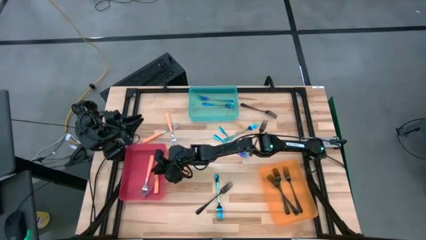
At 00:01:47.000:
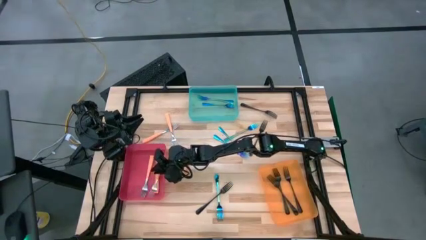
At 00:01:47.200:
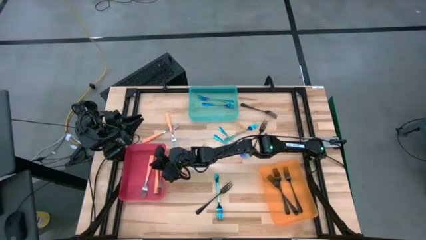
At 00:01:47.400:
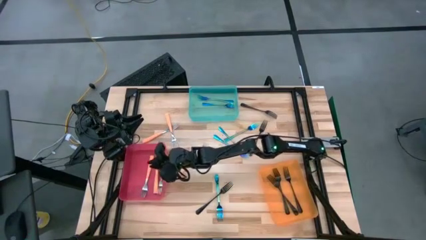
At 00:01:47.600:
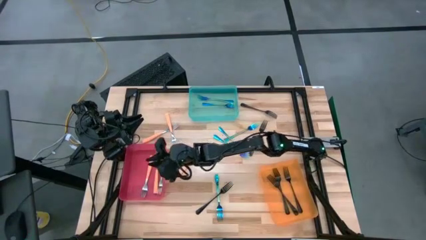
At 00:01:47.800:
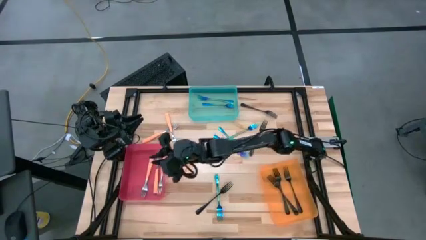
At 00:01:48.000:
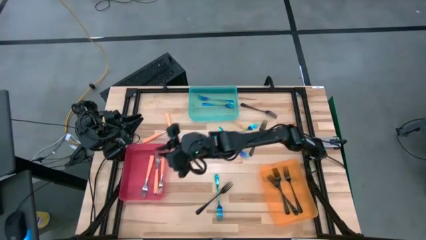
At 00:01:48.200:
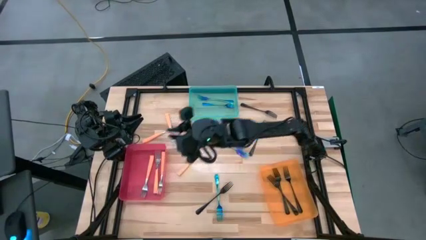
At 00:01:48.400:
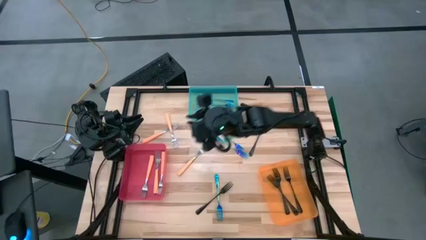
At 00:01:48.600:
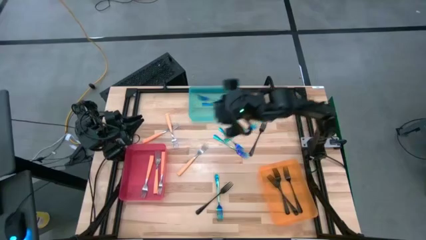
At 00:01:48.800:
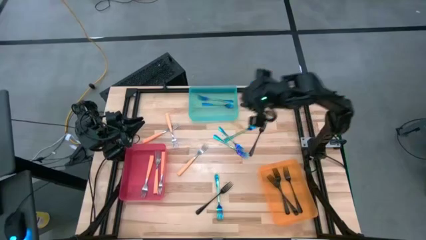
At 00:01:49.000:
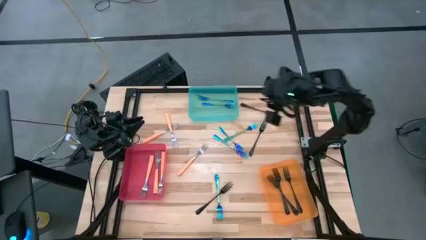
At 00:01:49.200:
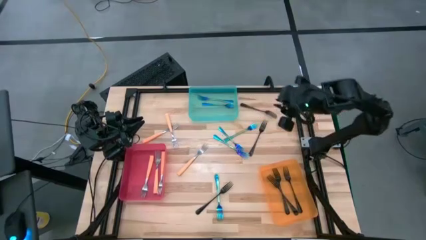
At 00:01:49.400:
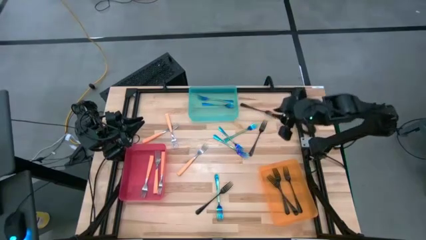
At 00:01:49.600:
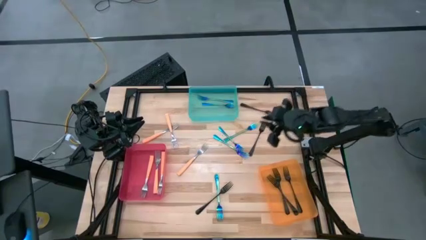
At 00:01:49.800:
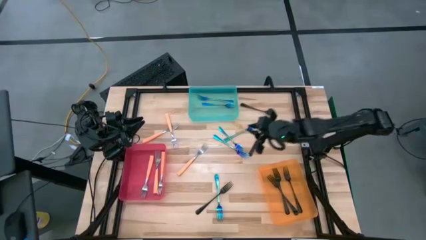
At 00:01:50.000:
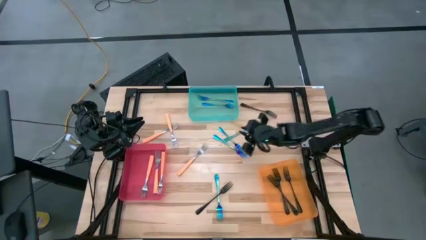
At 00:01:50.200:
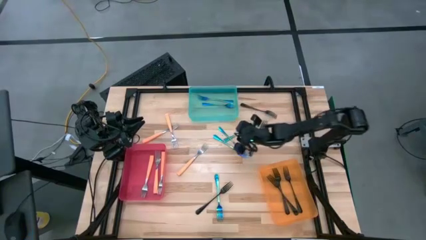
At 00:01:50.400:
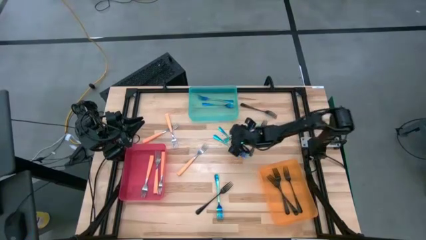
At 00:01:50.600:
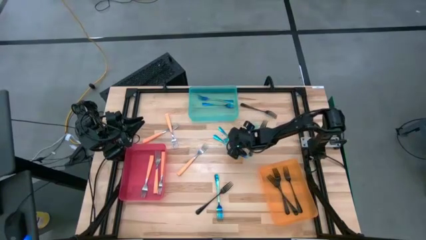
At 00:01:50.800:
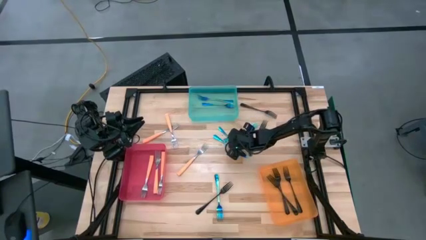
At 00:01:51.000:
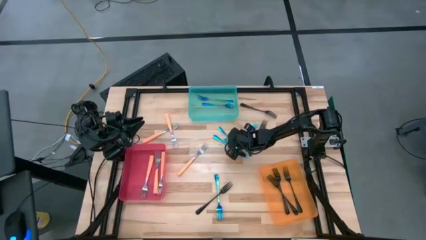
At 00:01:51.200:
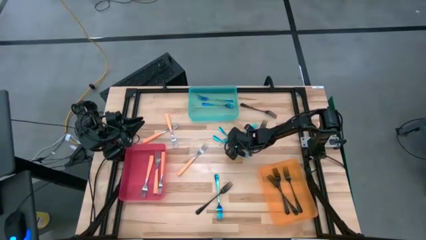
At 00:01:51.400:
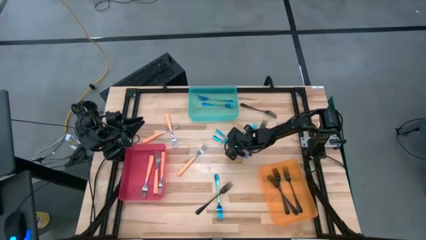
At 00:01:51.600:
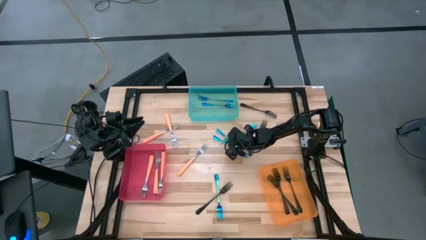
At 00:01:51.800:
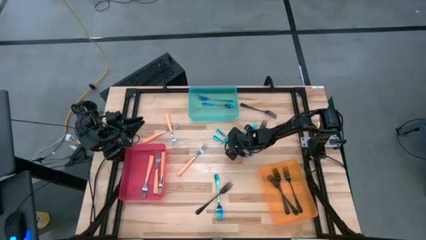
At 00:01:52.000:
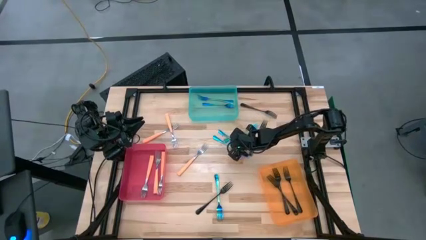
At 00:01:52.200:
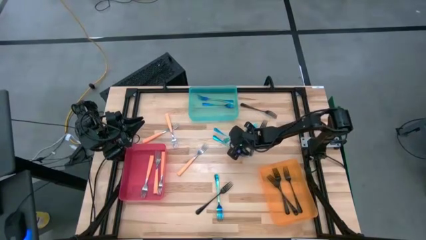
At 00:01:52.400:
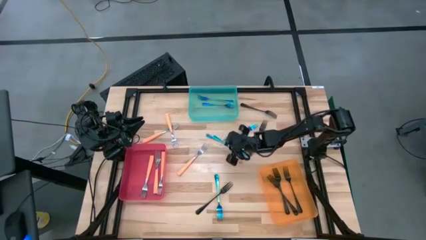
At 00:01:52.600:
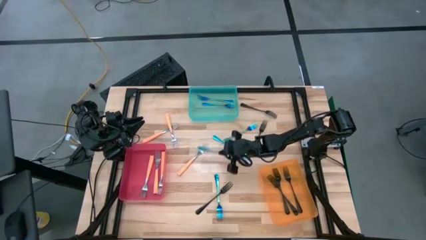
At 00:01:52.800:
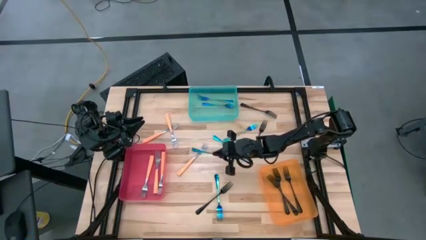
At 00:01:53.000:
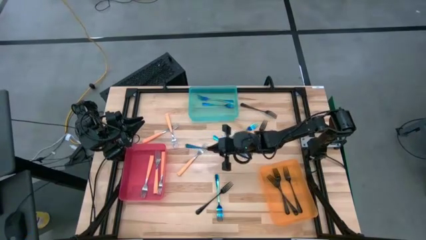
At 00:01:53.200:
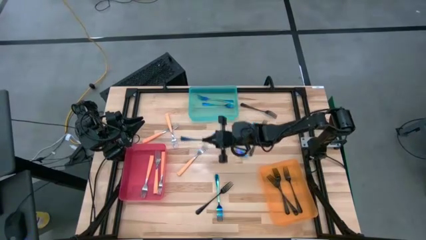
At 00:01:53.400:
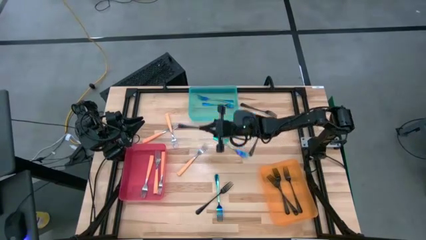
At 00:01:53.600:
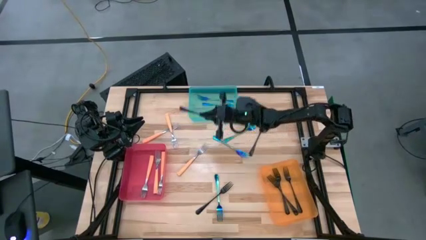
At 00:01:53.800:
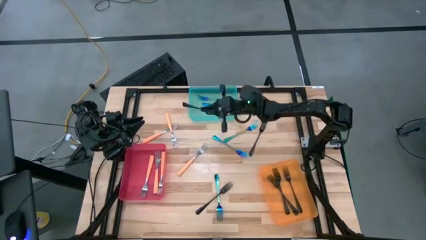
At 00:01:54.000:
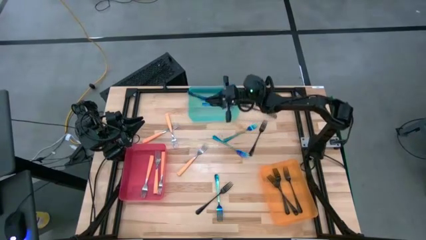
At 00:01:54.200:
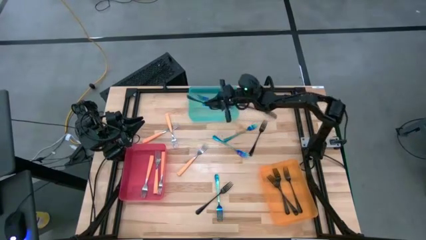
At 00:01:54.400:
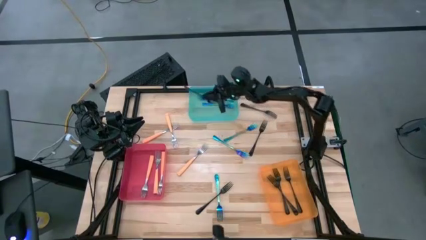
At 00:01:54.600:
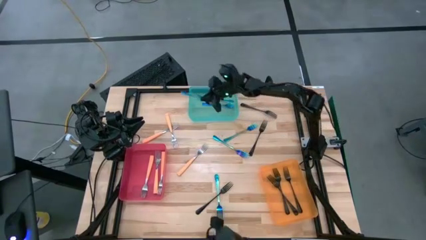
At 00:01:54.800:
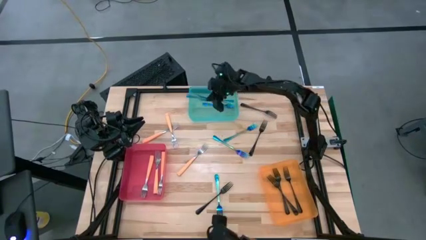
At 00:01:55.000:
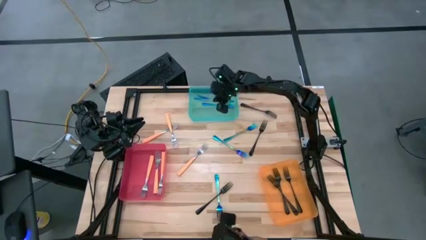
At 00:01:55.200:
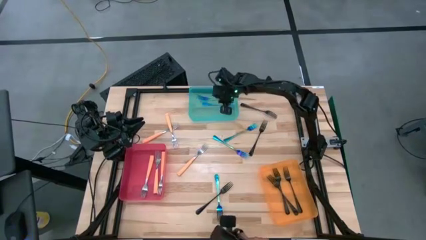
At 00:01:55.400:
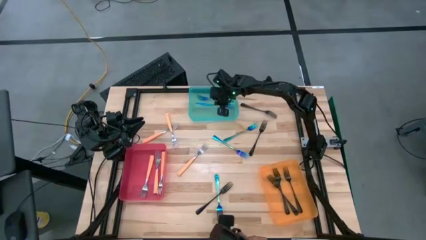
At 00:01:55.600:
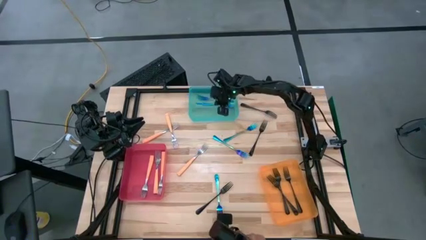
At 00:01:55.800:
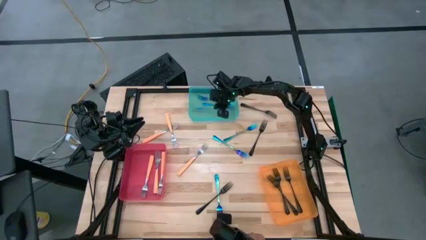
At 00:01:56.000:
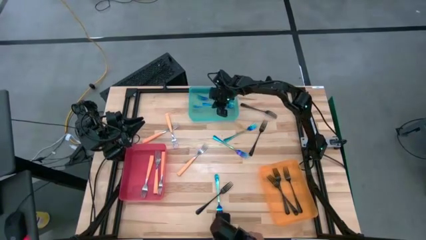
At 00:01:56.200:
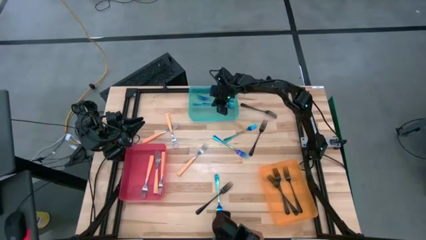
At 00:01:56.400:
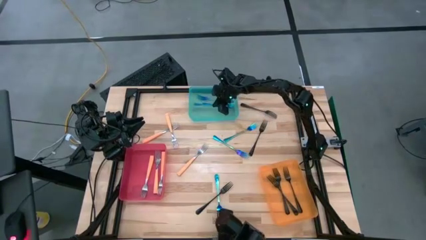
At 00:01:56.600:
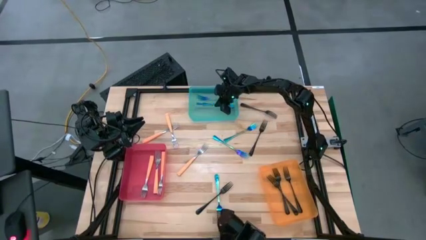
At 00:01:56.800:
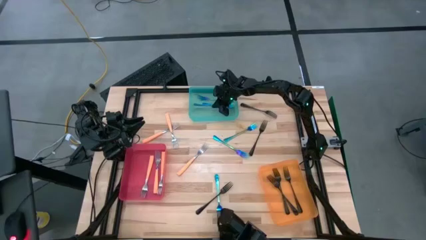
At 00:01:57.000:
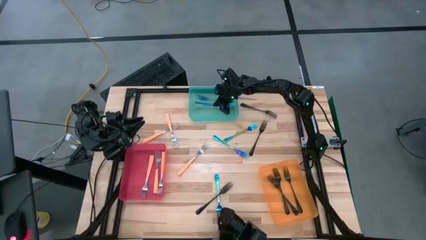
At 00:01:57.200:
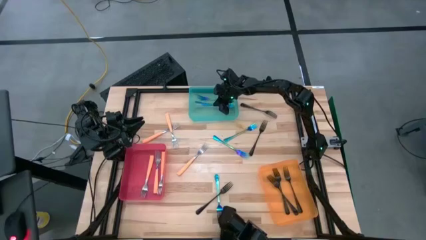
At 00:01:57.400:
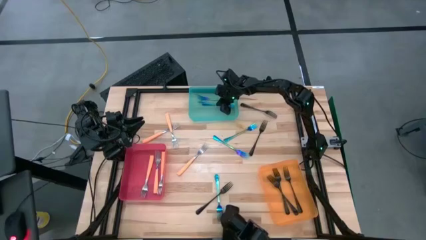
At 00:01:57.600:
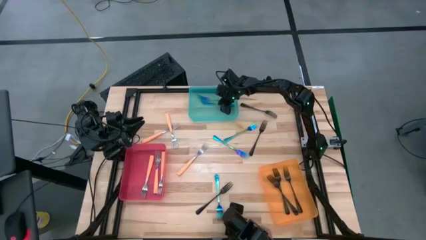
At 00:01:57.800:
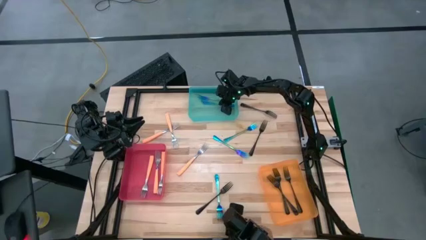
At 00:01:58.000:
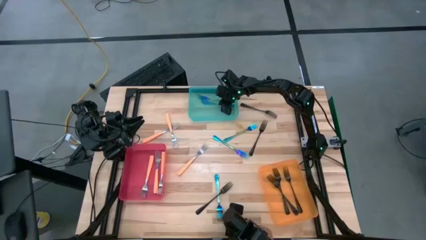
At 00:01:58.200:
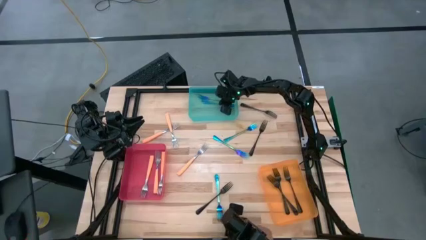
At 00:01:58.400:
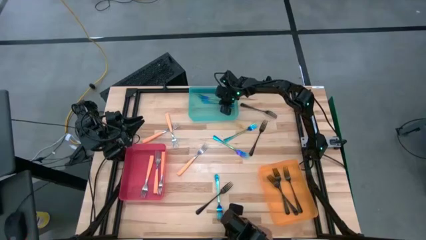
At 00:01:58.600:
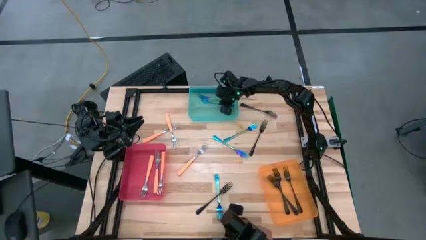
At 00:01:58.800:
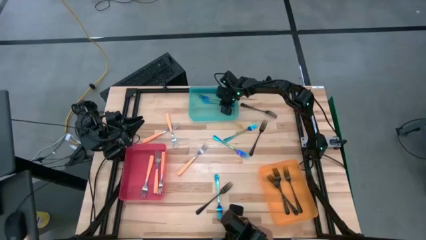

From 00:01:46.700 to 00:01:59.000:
Task: Sort silverware by color (type)
Put the blue fork into the blue bin

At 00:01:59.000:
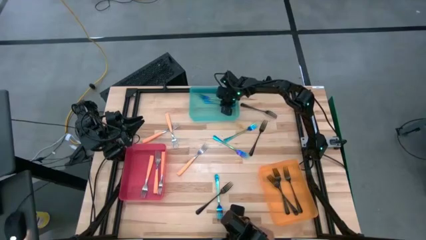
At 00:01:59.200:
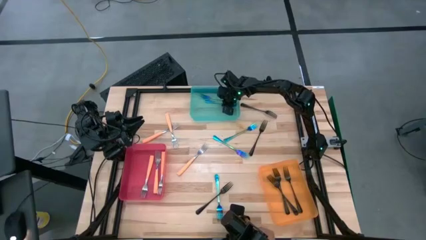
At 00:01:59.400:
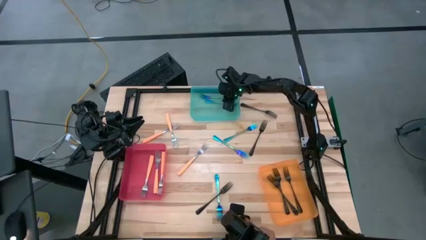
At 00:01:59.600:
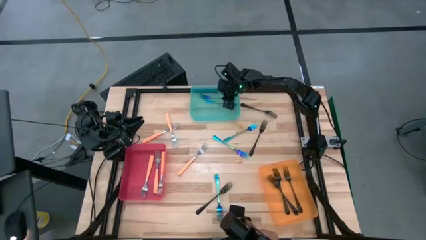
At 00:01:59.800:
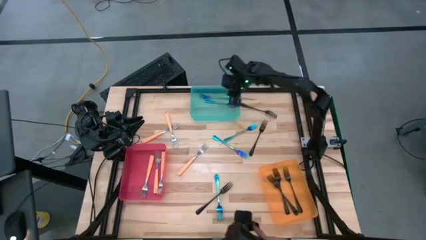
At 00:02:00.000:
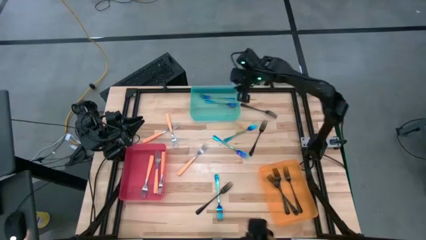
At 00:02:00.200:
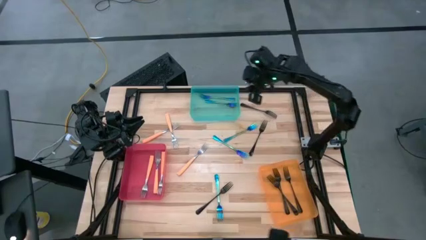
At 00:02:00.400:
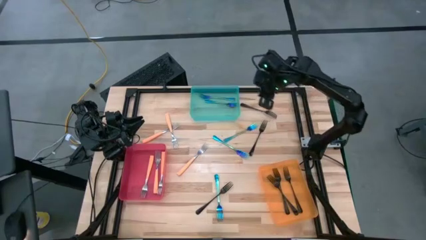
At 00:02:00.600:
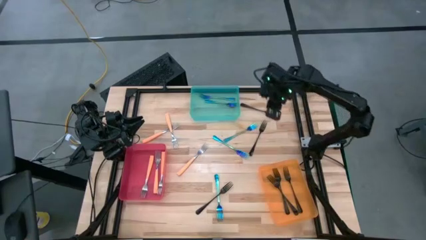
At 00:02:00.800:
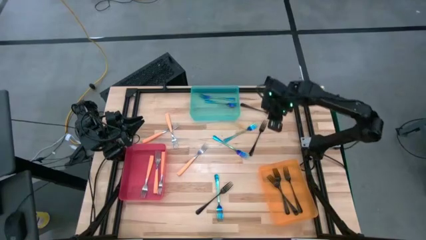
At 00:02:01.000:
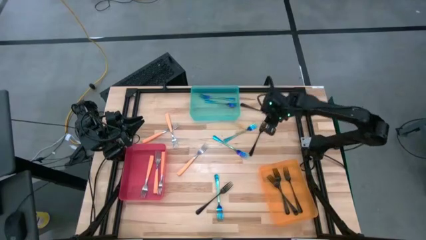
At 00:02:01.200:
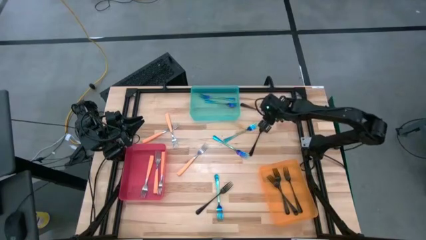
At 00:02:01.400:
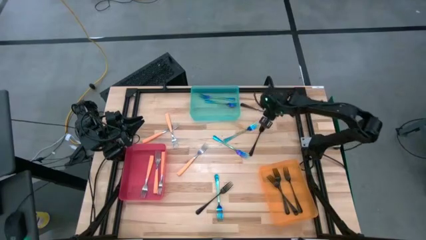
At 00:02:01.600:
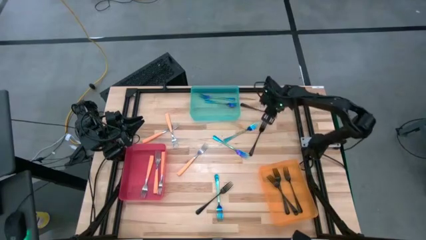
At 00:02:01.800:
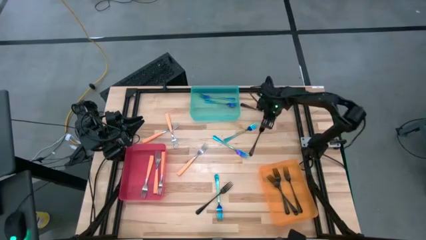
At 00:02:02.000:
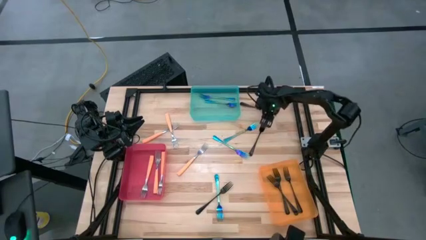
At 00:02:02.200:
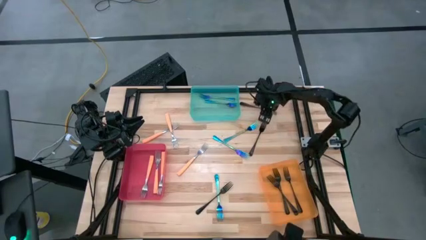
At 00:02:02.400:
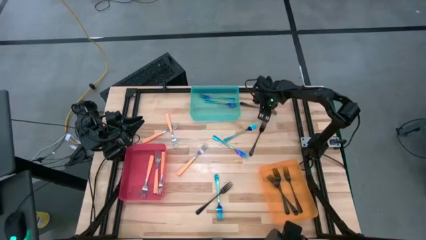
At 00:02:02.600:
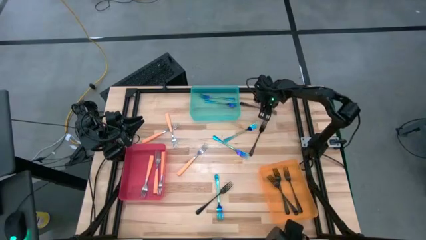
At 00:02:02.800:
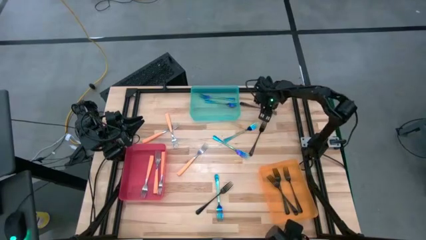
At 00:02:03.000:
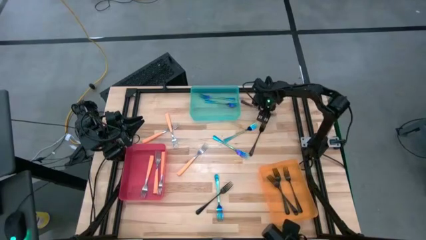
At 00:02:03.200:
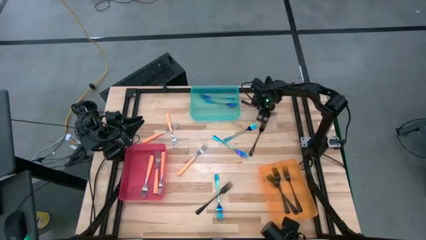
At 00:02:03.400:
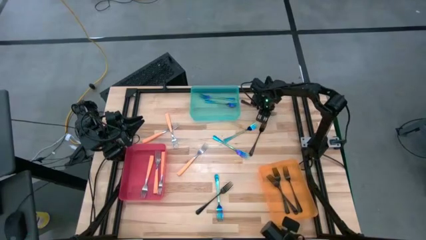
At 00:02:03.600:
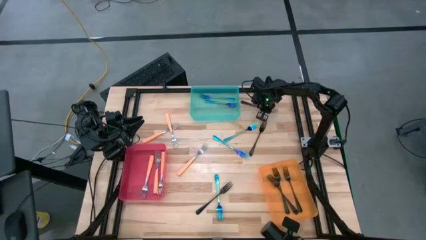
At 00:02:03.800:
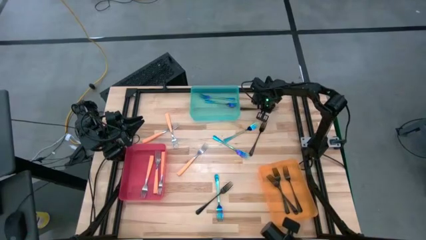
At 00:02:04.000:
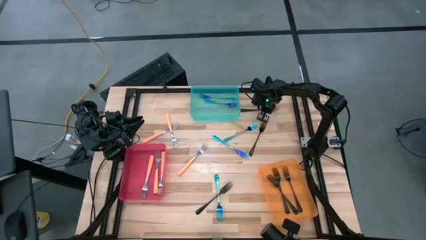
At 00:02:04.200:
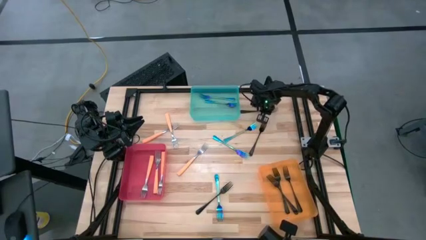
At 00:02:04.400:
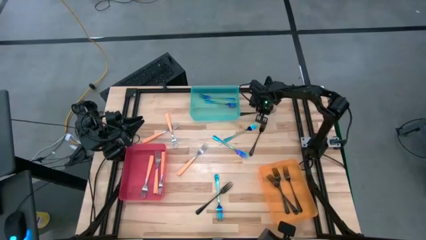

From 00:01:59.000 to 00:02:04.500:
Put the black fork into the orange bin
